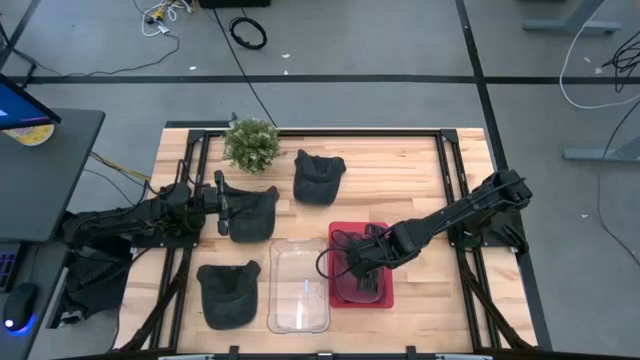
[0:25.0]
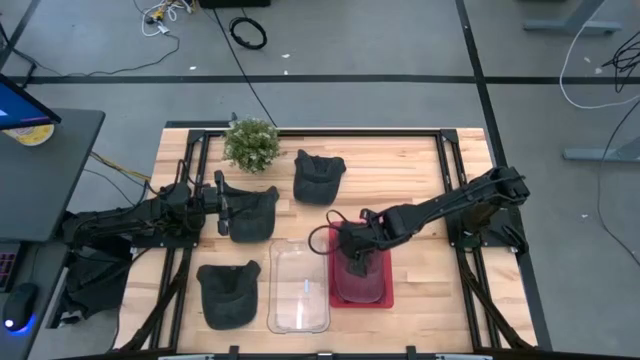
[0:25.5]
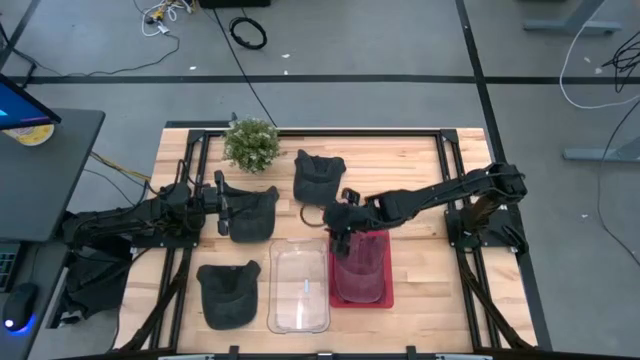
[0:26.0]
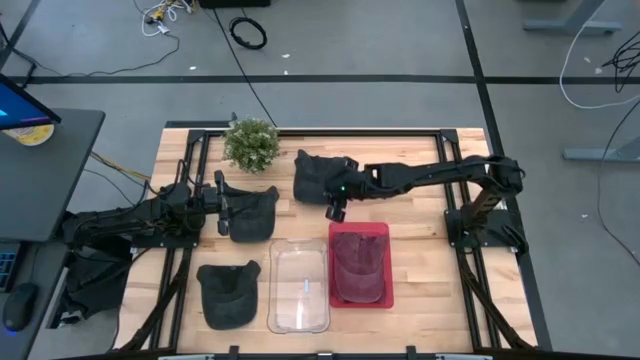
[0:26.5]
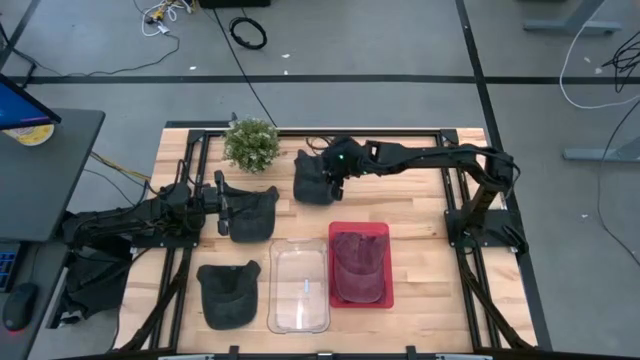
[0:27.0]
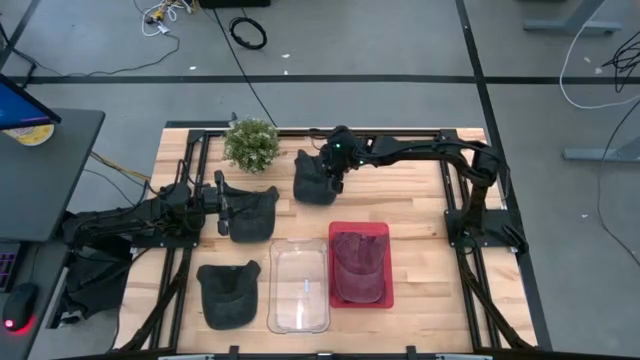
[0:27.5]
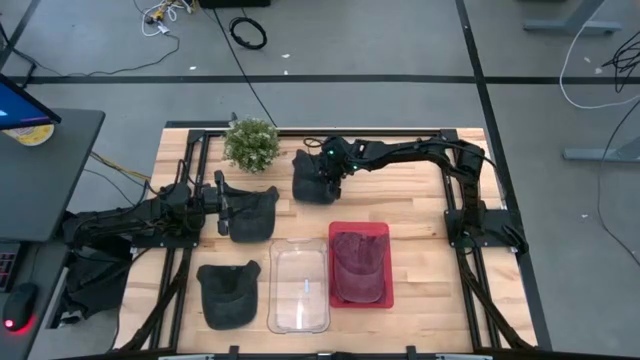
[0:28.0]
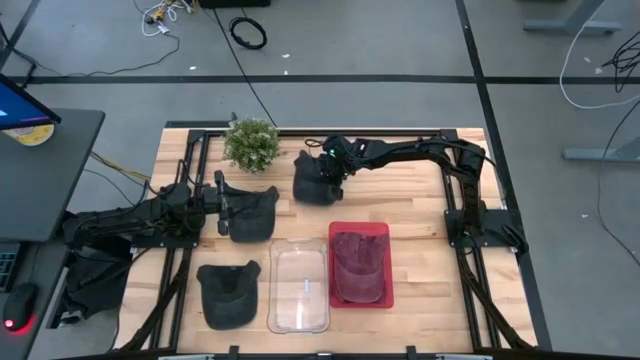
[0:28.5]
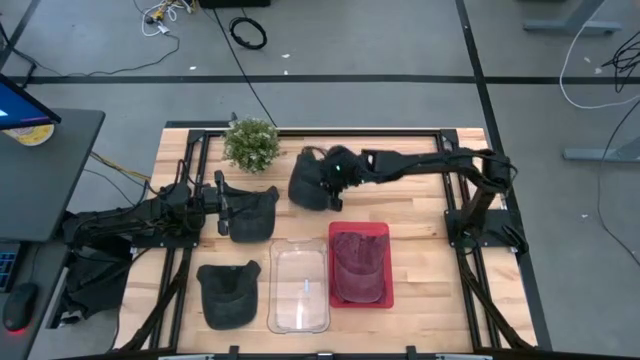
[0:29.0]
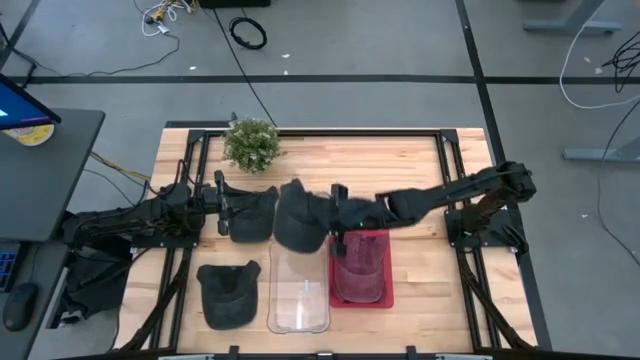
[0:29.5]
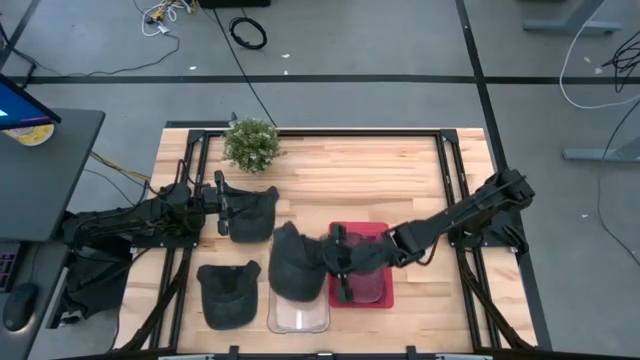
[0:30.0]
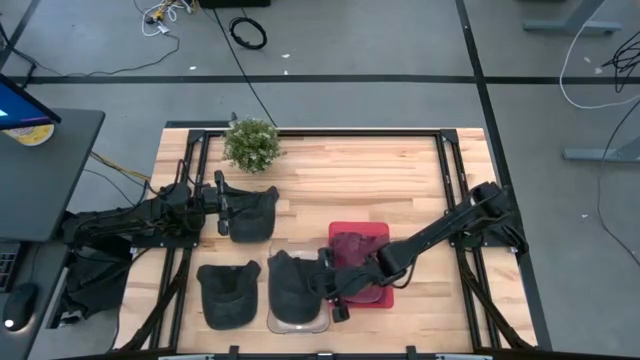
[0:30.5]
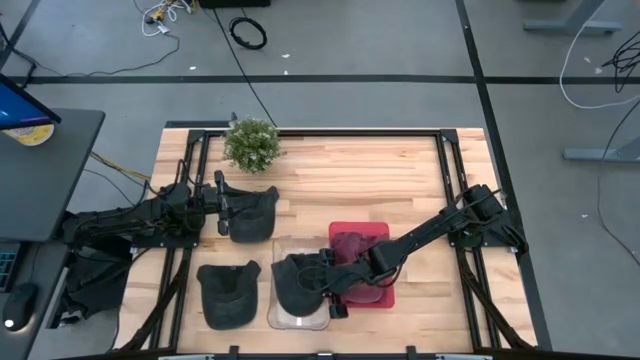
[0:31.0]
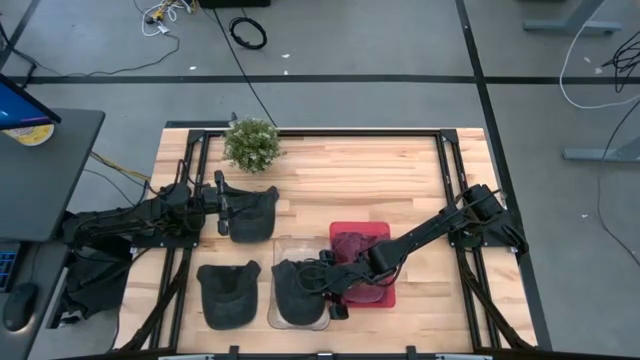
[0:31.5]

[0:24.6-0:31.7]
Task: Pick & Place hat
Put the top black cap into the transparent bin

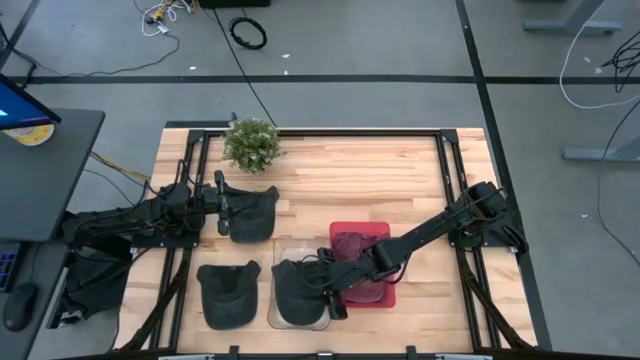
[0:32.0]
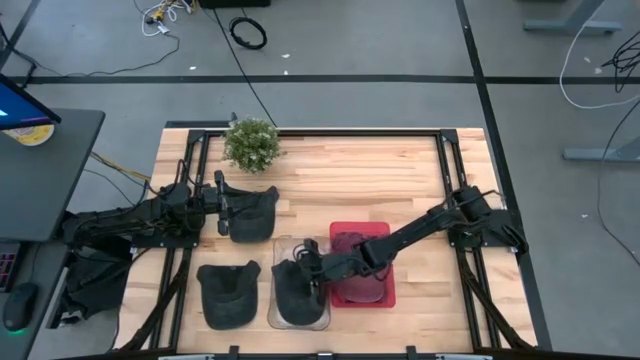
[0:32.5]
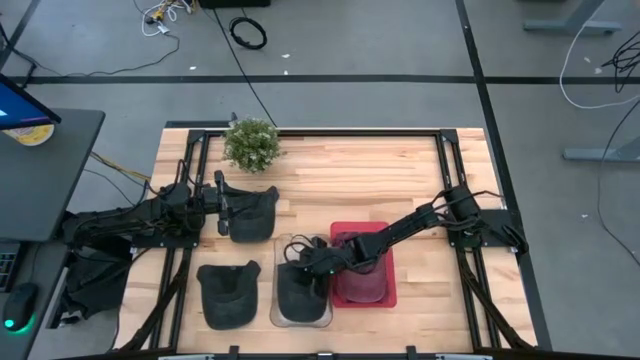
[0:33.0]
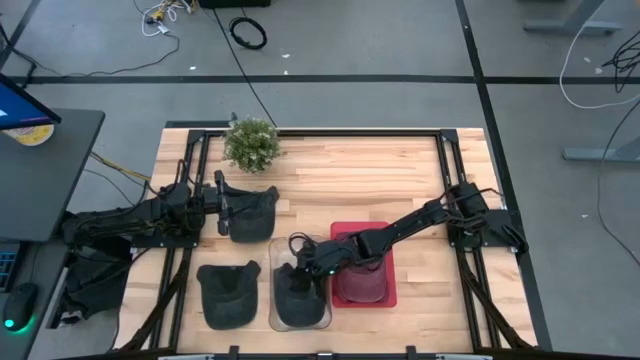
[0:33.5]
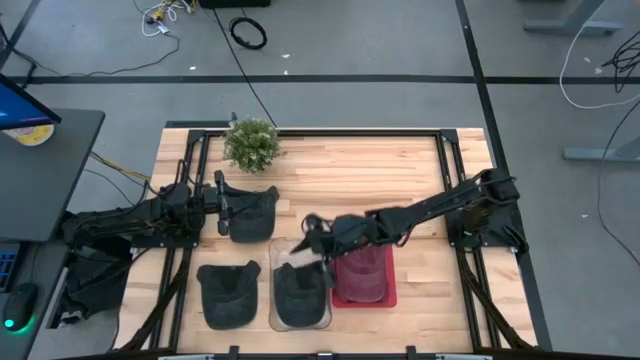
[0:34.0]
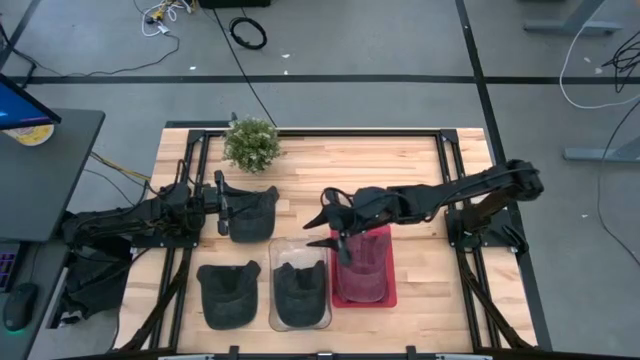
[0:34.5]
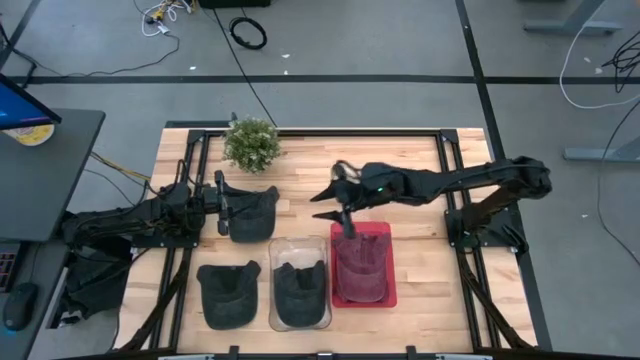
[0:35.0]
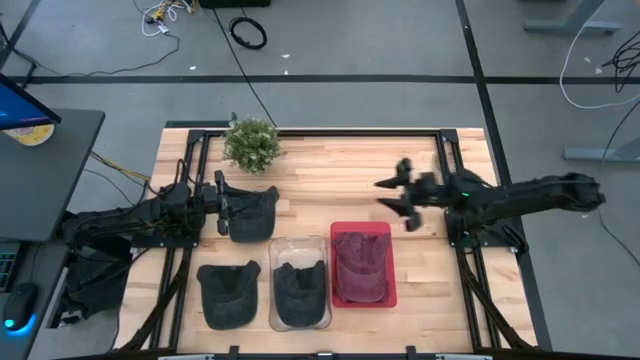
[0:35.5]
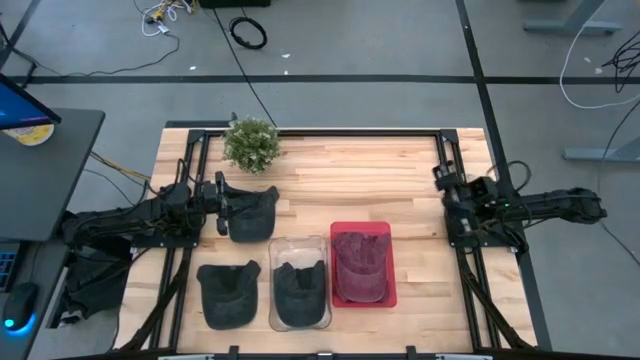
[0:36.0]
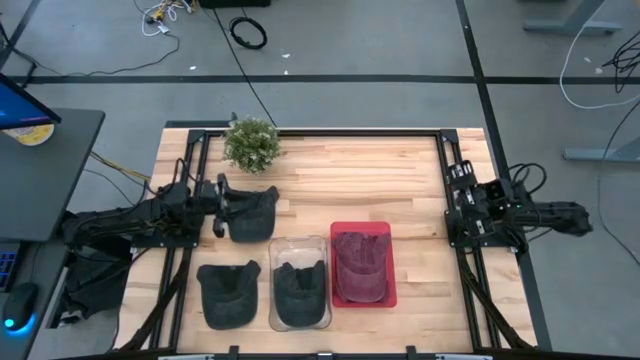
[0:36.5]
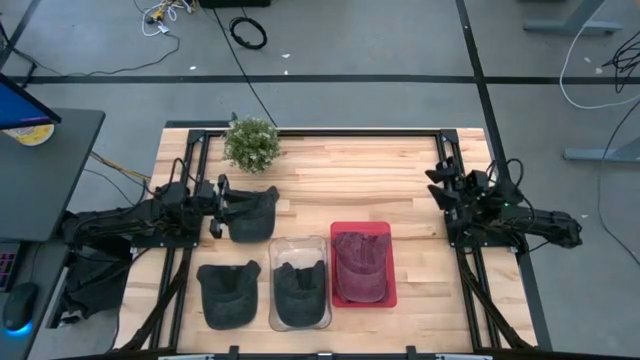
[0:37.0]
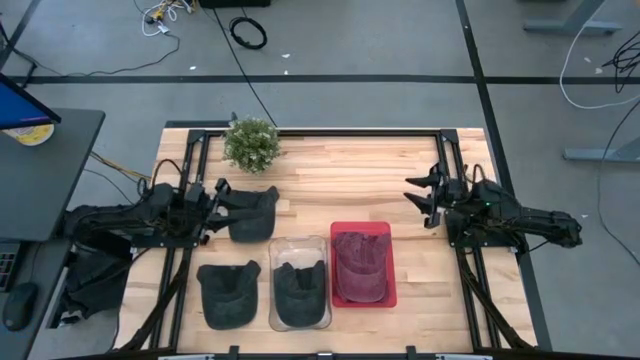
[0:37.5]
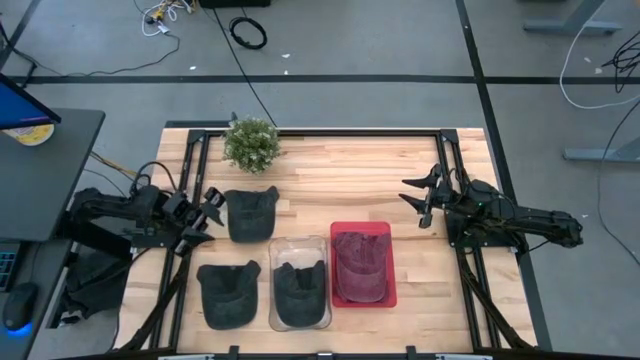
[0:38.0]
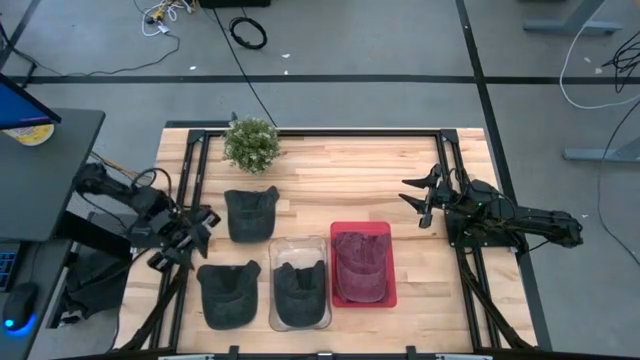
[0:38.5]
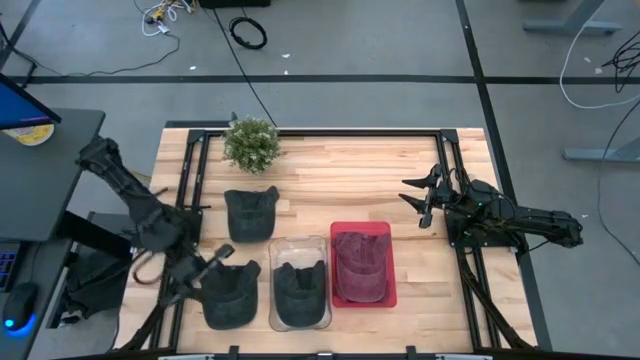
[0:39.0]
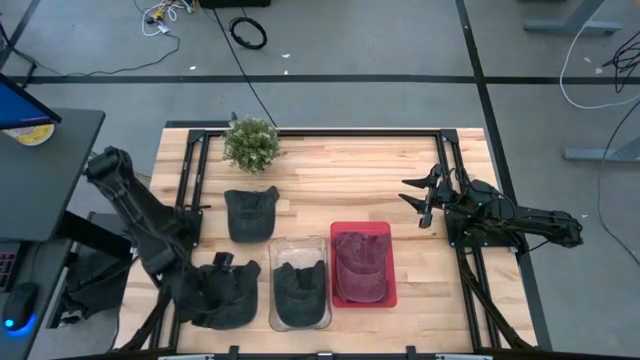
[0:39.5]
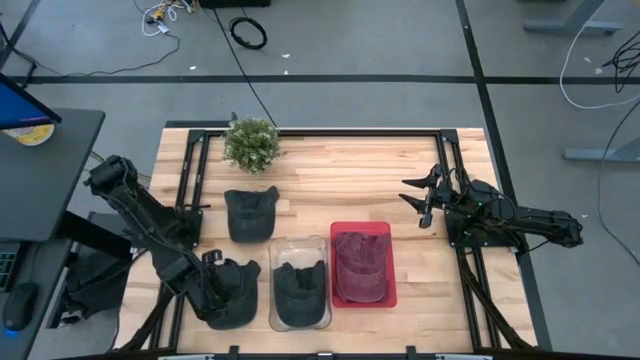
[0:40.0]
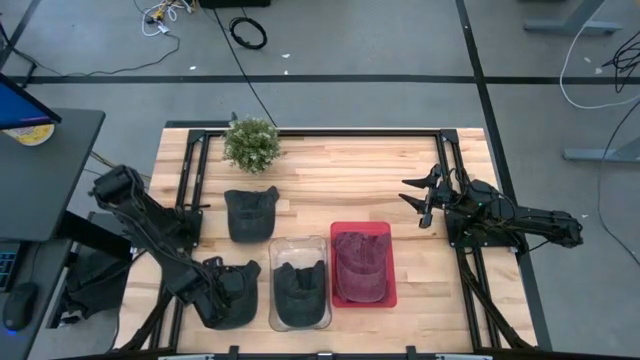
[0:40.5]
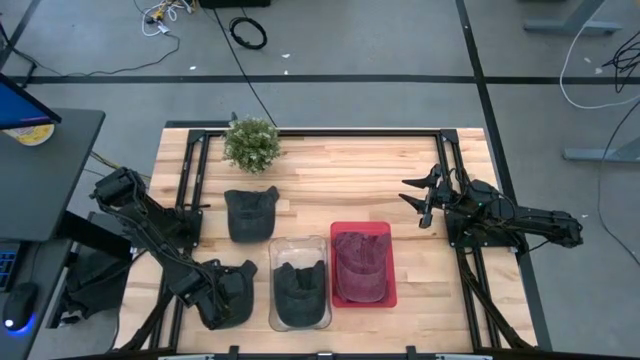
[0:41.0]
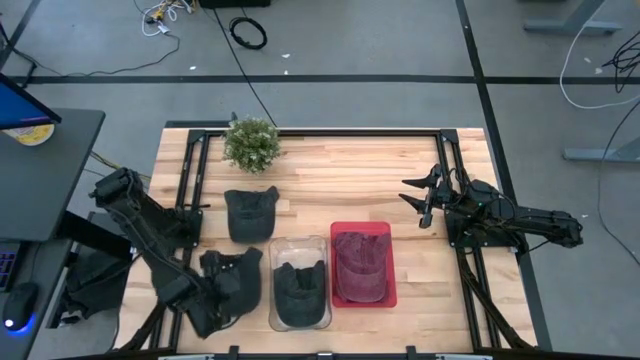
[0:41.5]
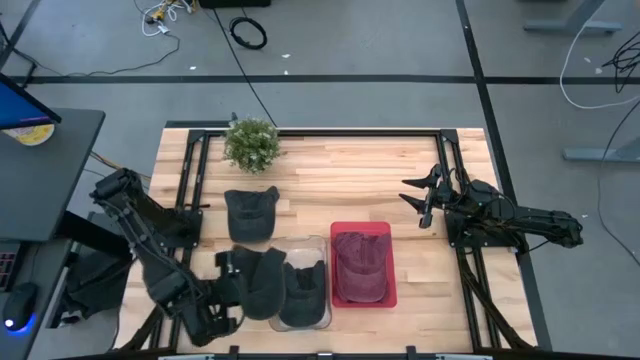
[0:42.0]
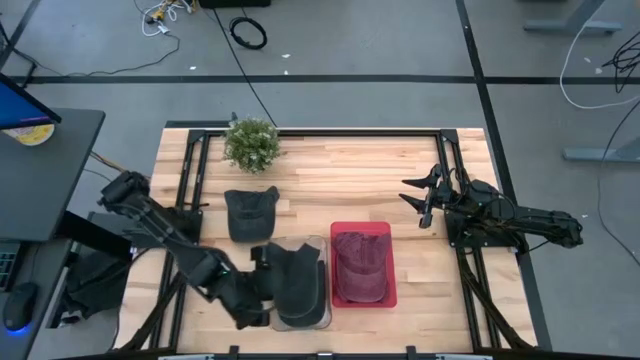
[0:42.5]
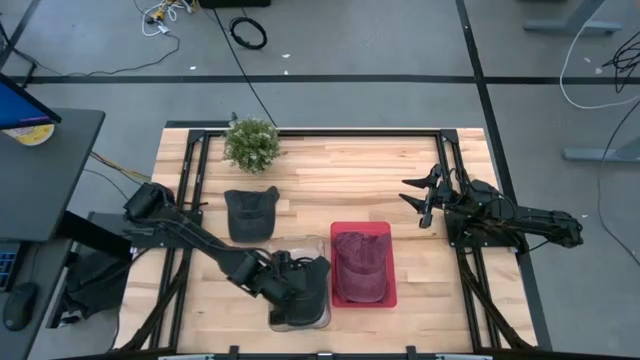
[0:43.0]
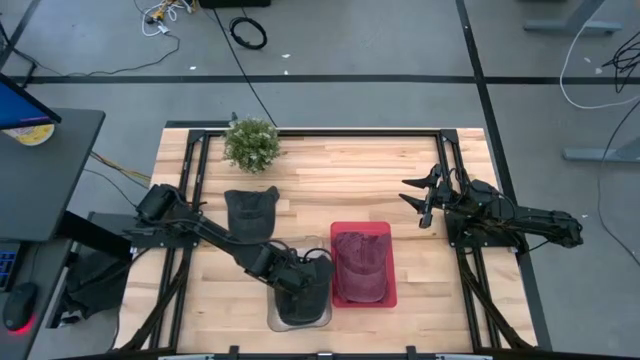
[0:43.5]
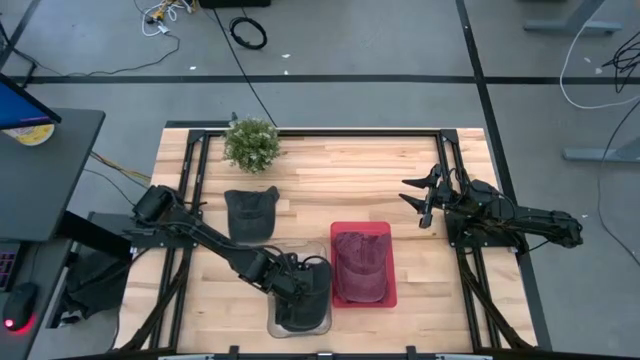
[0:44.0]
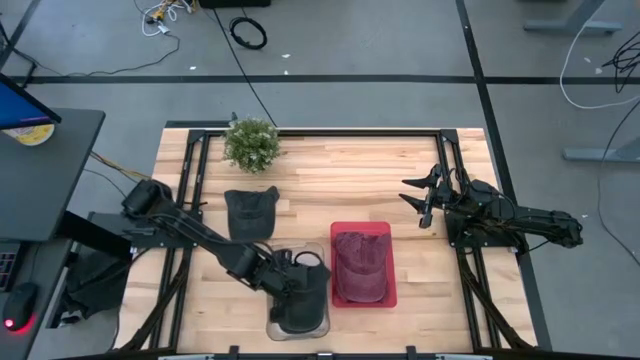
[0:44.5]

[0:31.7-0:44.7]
Put the bottom black cap into the transparent bin
